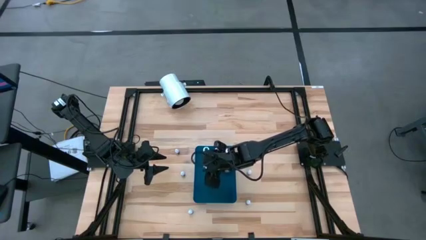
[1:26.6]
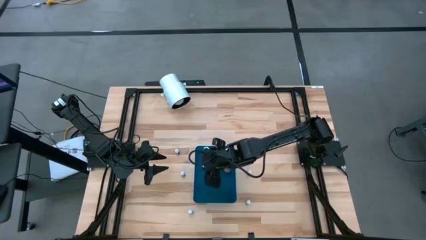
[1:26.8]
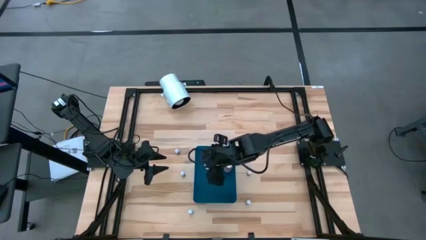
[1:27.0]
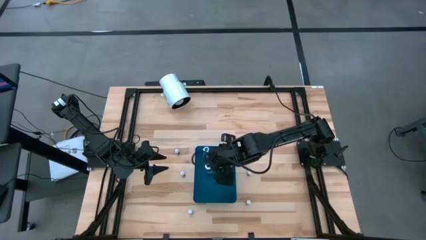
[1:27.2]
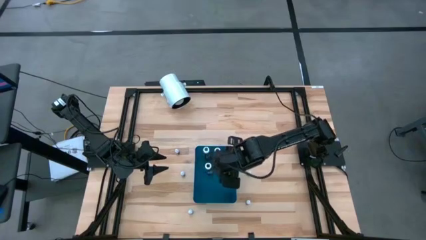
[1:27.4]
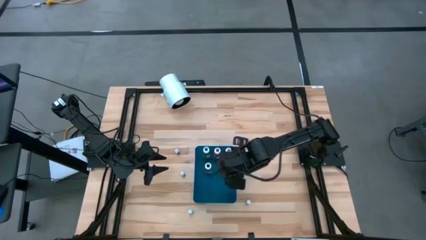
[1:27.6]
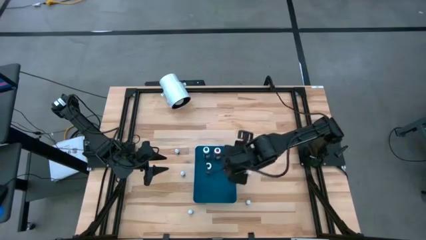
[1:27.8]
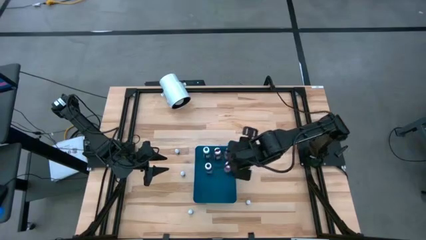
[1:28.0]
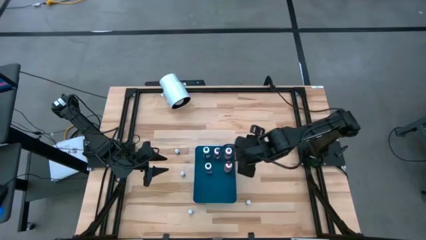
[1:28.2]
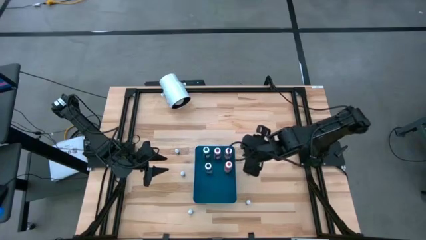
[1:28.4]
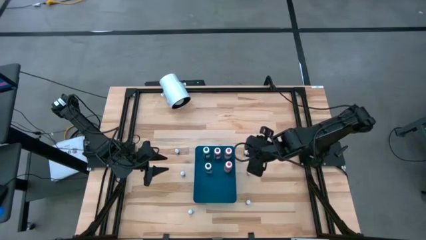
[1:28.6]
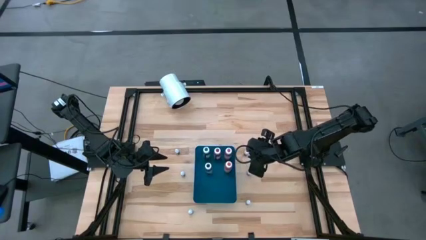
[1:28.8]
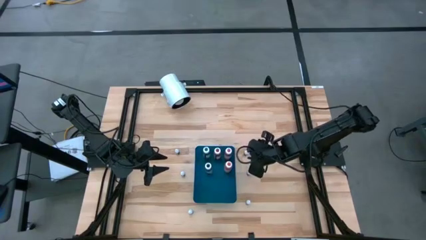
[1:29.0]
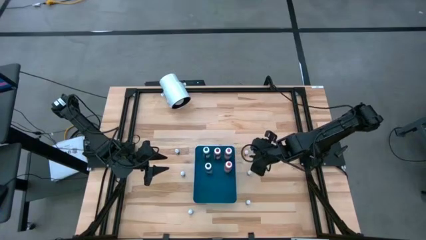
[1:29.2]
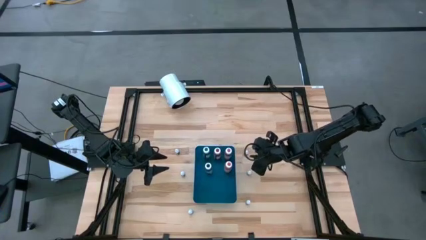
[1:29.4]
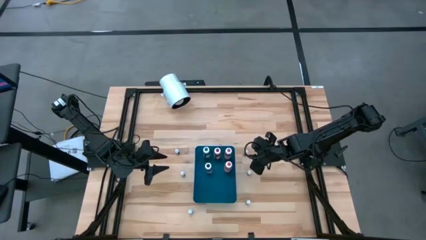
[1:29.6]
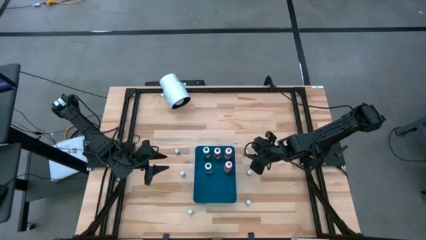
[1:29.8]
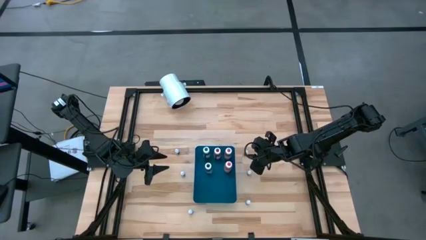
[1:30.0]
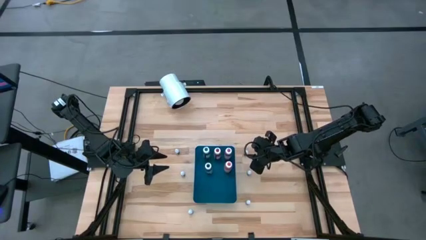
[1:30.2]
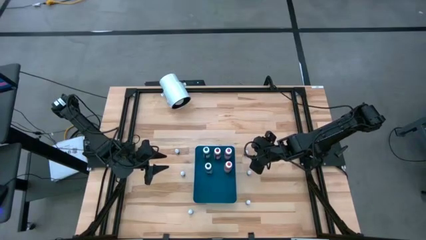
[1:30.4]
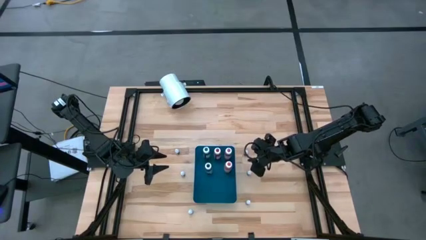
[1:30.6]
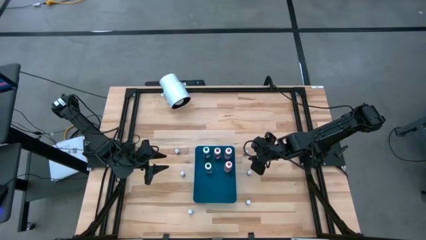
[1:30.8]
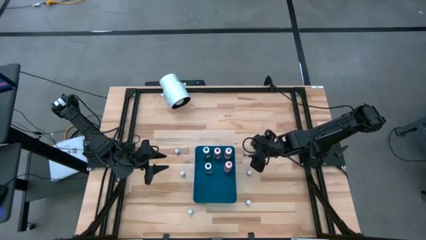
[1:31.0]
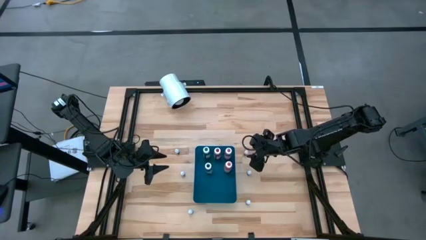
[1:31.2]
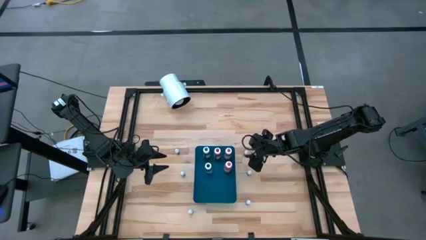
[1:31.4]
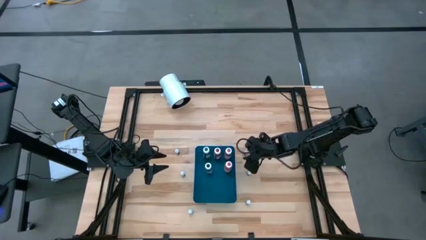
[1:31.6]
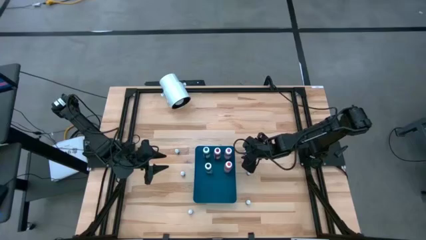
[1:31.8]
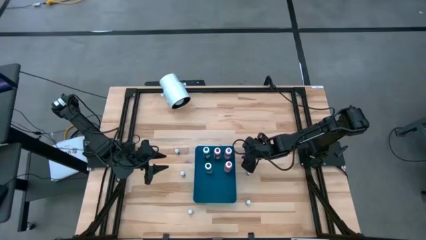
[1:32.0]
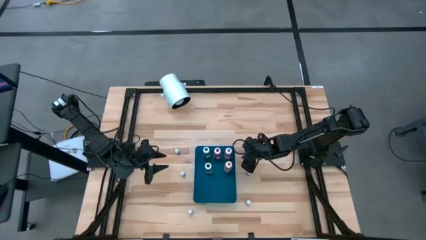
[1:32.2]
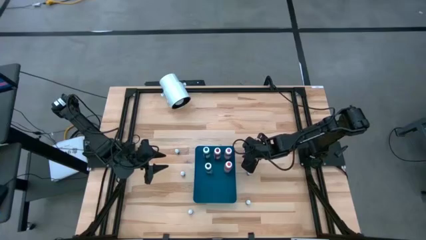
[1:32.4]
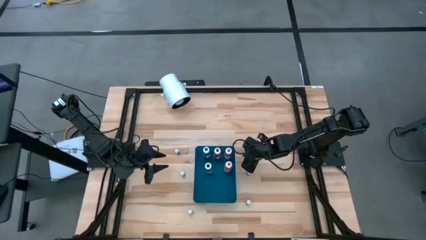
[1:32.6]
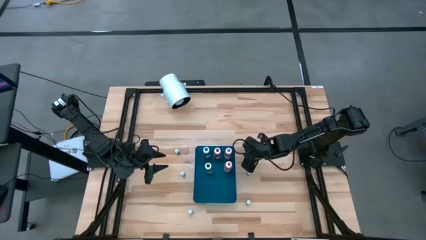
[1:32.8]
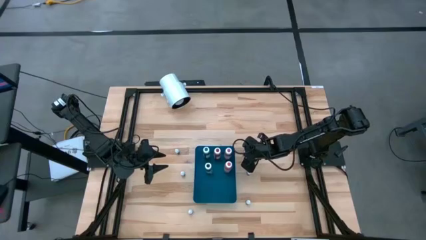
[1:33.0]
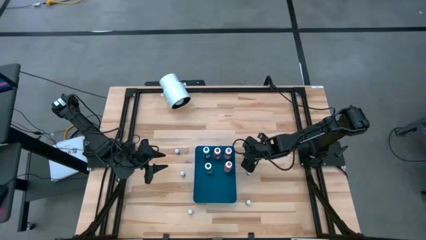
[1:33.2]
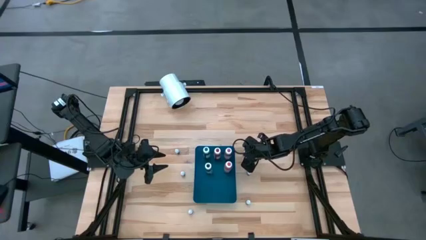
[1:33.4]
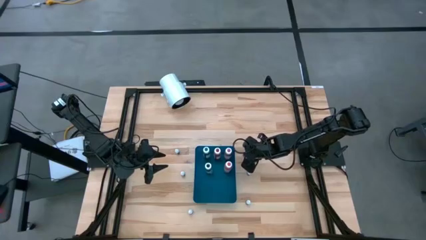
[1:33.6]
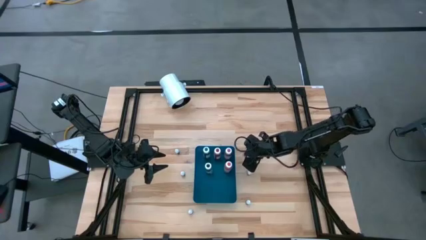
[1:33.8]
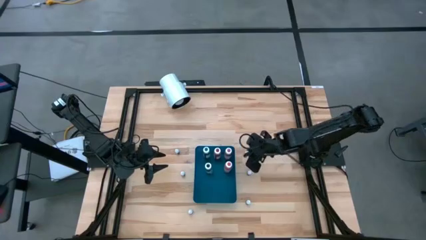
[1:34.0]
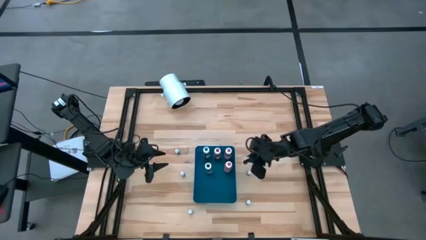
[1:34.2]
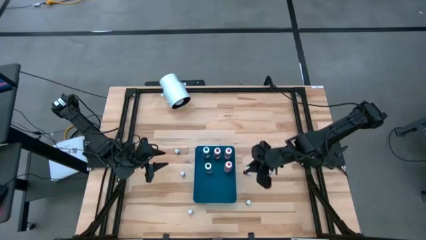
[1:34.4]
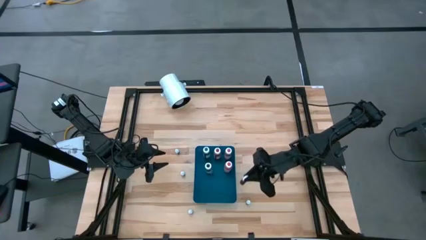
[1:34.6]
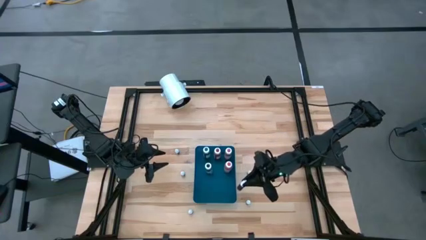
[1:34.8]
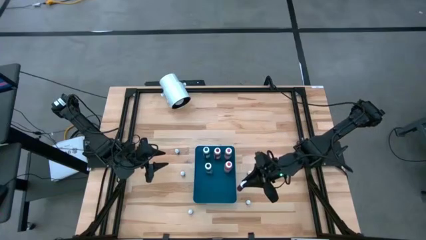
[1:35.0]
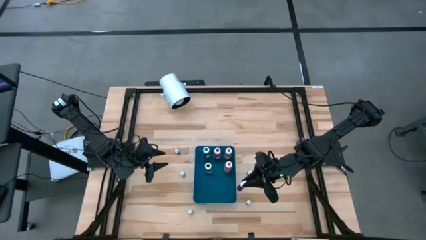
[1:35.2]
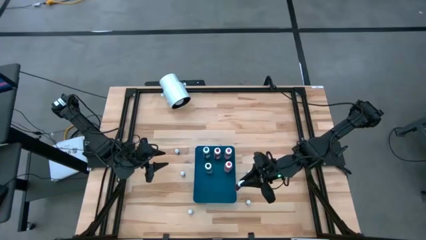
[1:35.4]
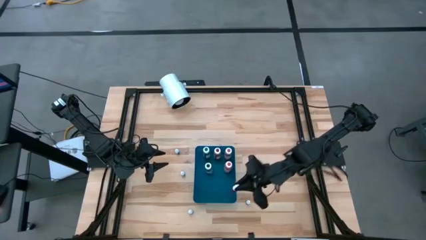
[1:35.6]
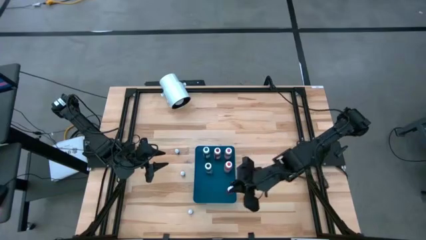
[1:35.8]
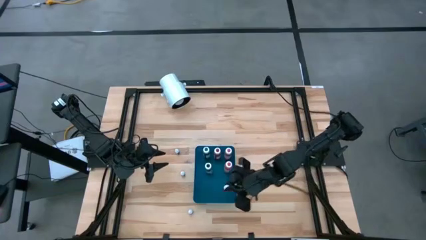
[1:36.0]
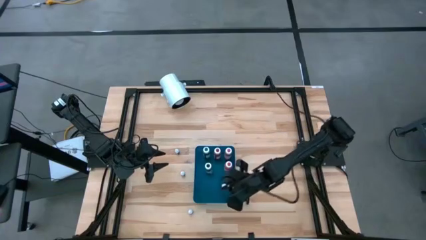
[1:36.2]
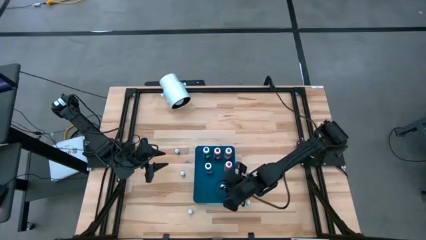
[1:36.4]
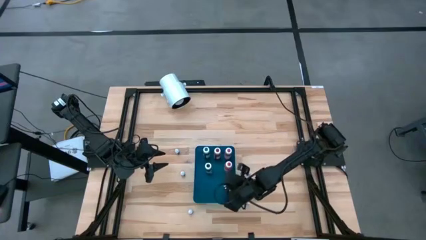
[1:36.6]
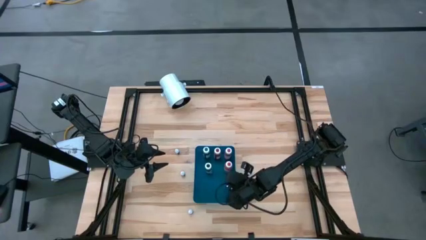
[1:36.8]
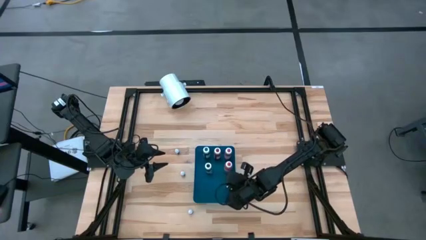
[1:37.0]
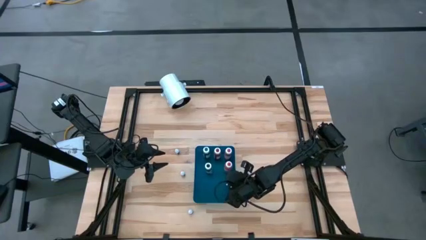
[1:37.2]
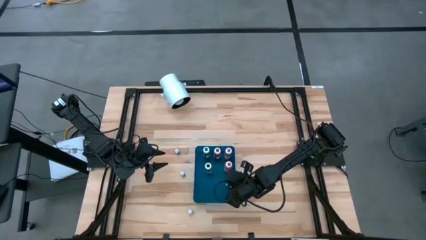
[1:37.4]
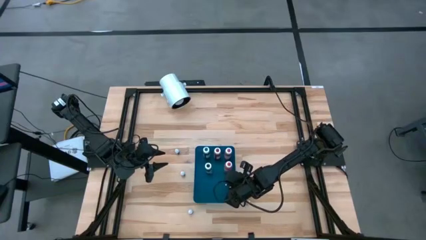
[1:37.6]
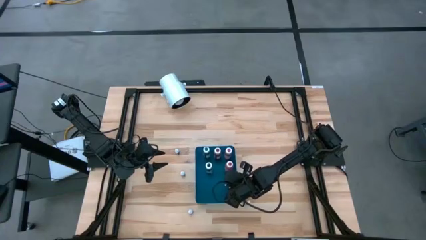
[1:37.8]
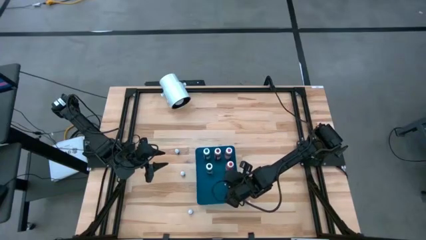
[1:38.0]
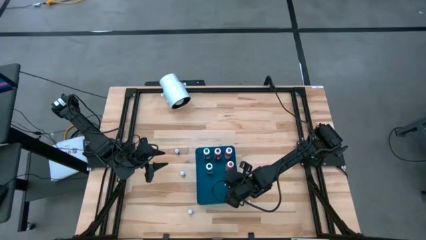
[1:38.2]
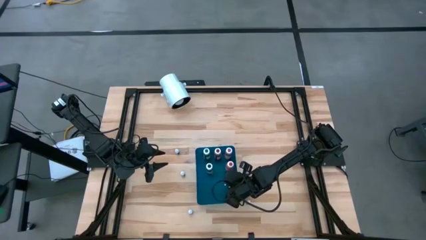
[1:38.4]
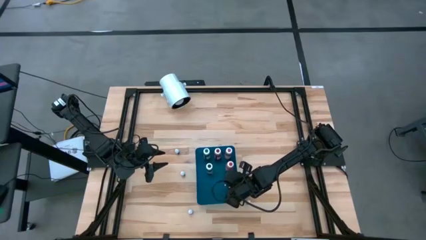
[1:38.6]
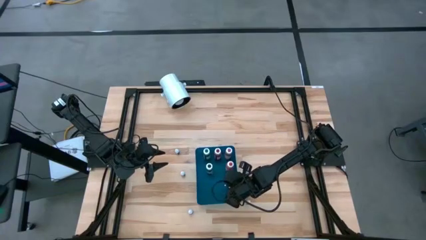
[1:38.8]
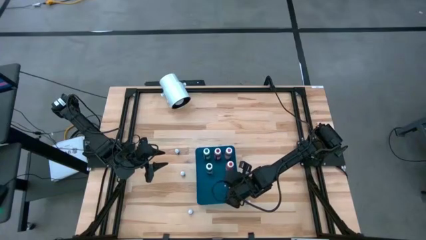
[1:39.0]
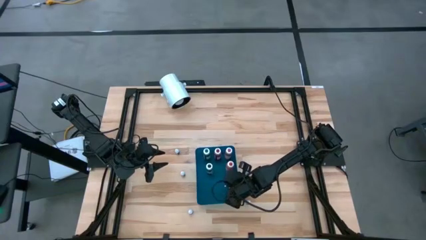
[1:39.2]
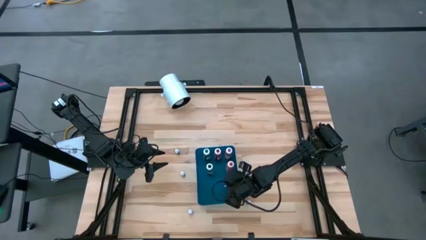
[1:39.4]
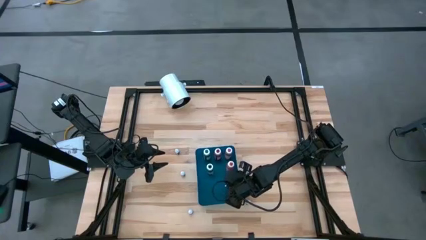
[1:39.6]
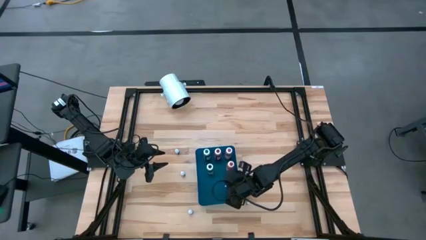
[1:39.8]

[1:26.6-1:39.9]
Task: Pick & Place food coloring
Put the small red food coloring bottle into the blue container

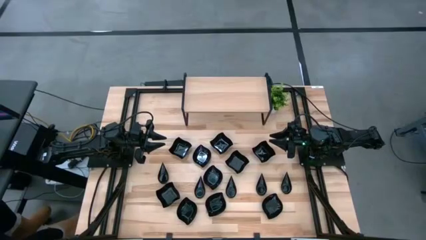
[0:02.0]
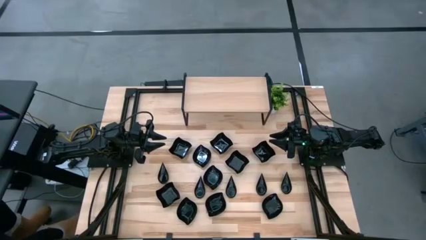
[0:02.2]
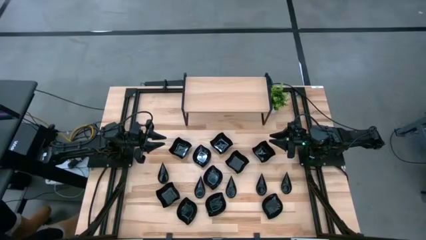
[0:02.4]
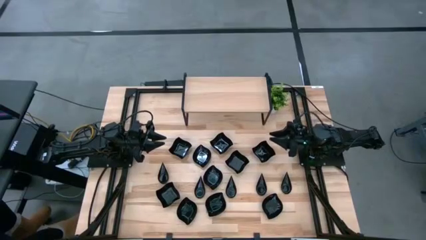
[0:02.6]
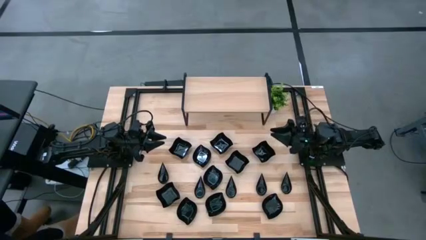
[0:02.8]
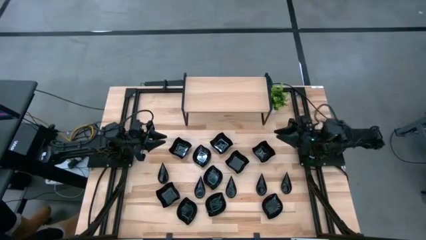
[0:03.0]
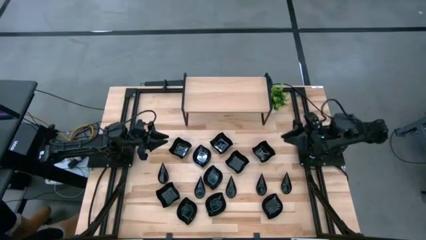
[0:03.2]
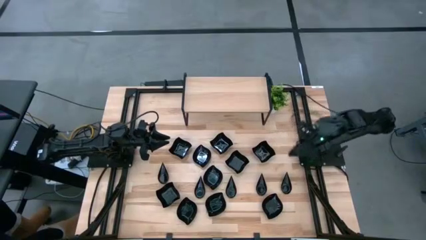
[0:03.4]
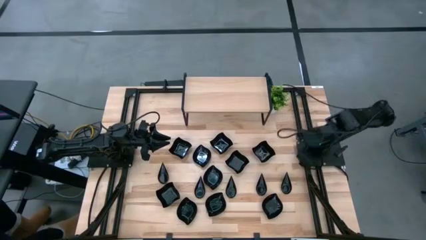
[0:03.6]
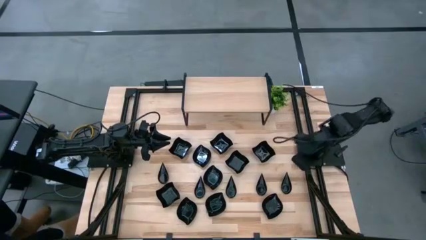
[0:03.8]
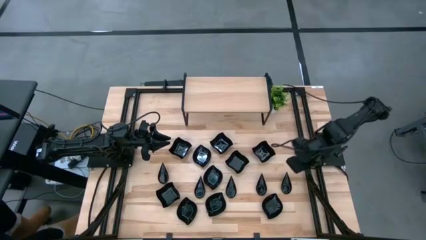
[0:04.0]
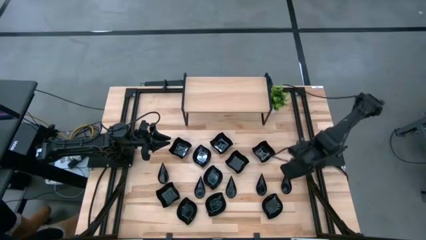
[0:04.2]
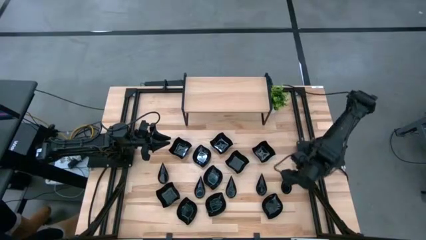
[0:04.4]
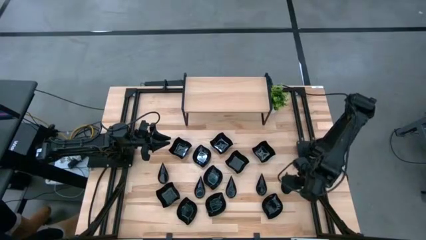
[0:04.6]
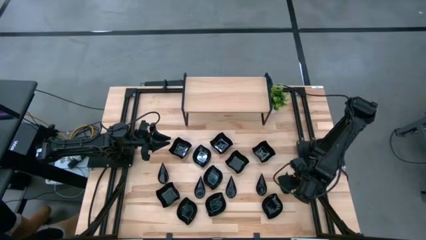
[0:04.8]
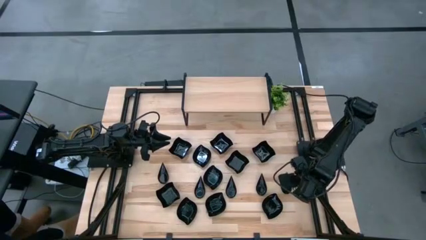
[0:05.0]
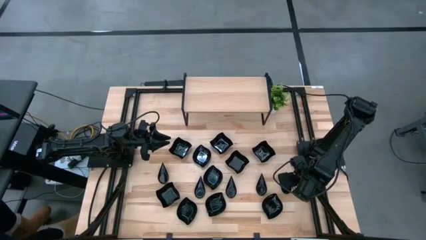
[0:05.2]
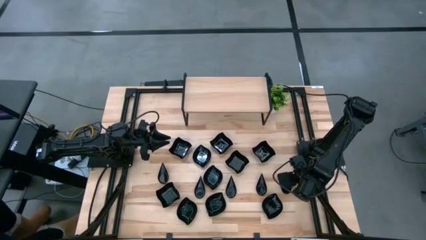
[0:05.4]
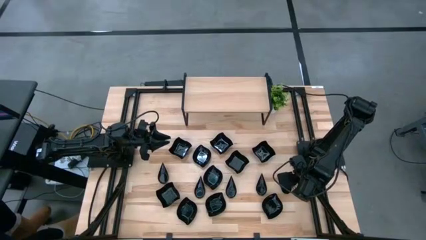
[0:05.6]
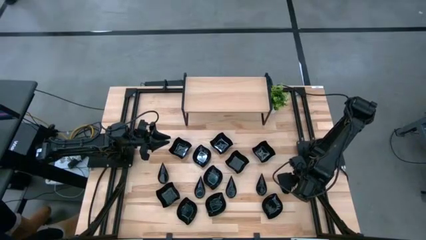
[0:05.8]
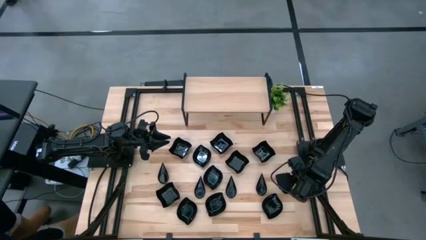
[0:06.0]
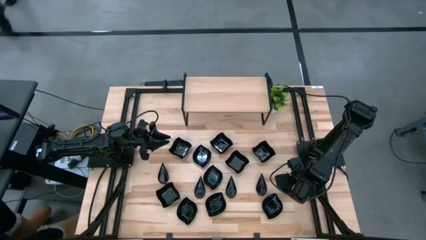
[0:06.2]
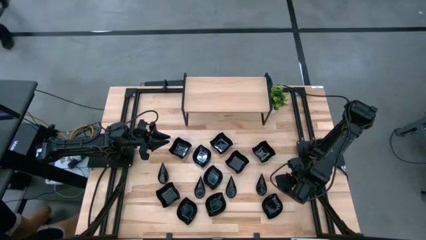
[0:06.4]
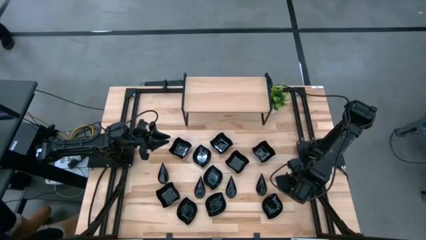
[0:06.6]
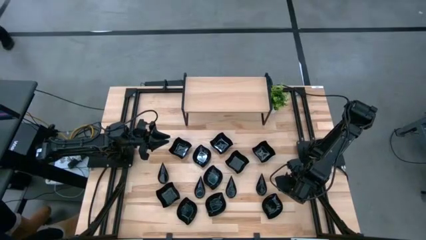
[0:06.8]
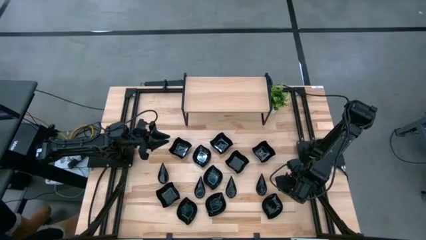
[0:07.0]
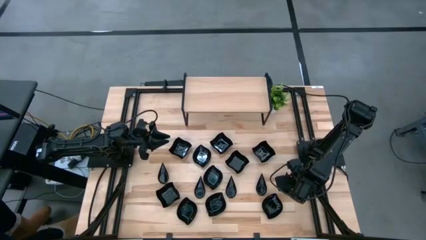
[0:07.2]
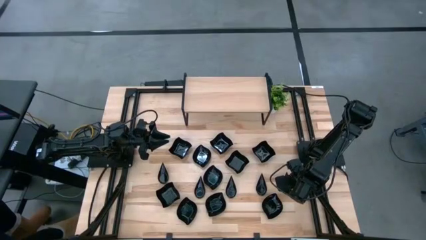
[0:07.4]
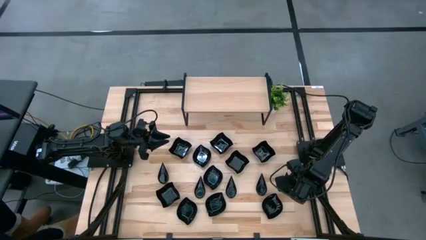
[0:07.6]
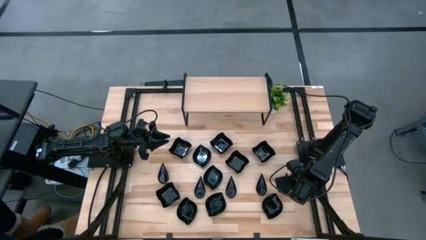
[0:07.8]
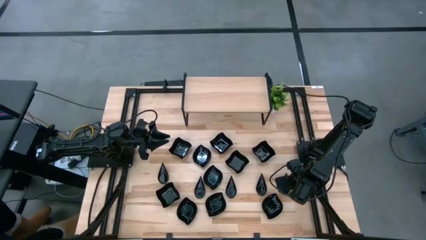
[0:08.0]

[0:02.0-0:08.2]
Task: Pick & Place Mini shaped plates
Put the black drop shaped plate on the shelf
